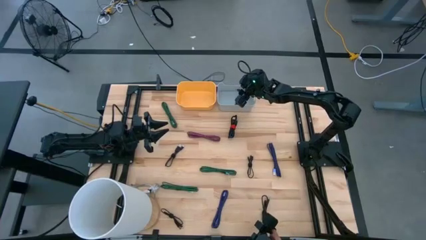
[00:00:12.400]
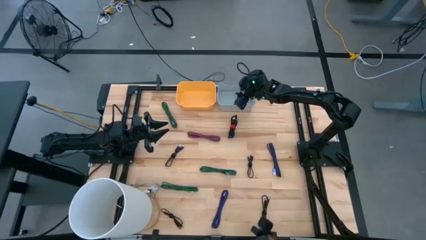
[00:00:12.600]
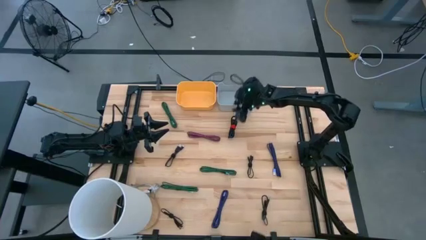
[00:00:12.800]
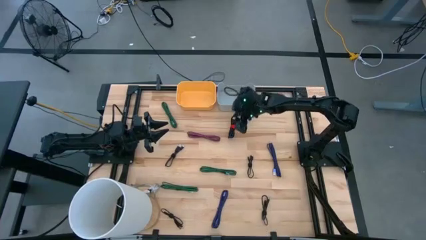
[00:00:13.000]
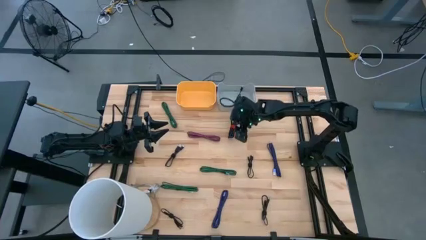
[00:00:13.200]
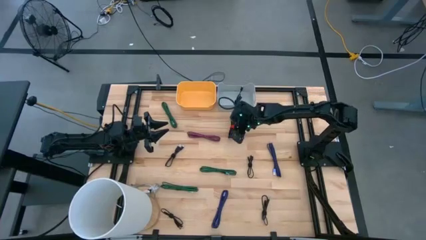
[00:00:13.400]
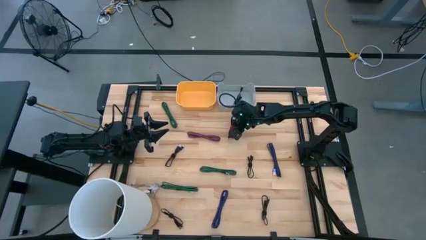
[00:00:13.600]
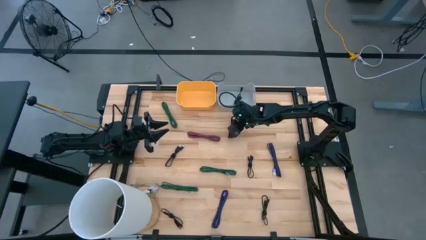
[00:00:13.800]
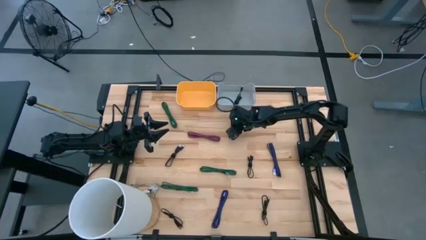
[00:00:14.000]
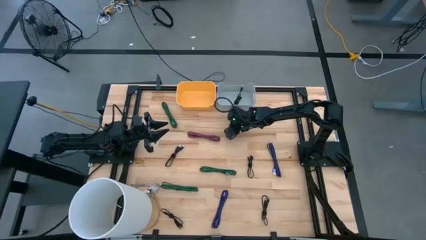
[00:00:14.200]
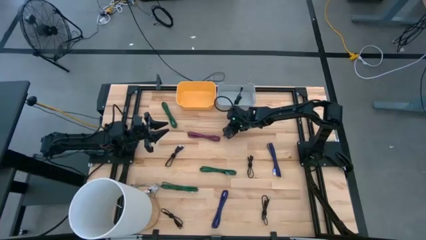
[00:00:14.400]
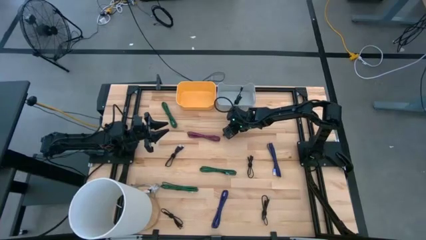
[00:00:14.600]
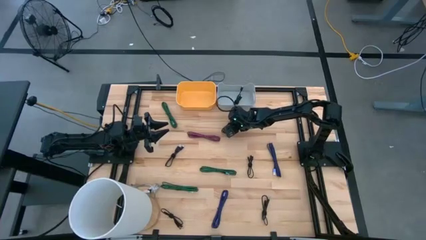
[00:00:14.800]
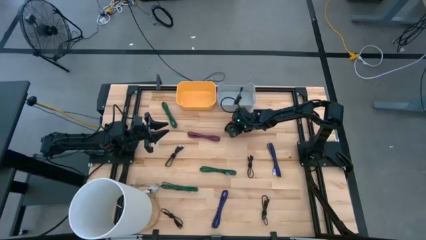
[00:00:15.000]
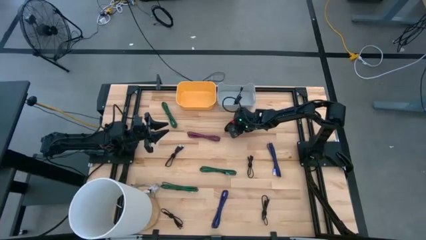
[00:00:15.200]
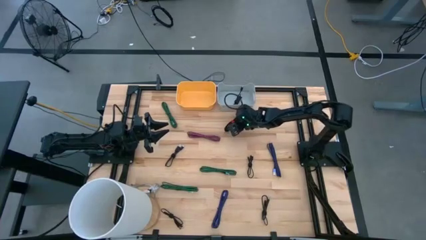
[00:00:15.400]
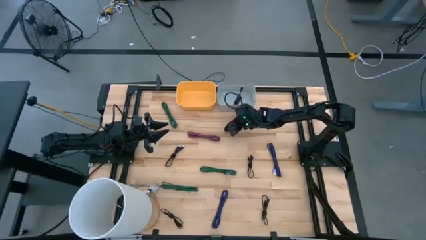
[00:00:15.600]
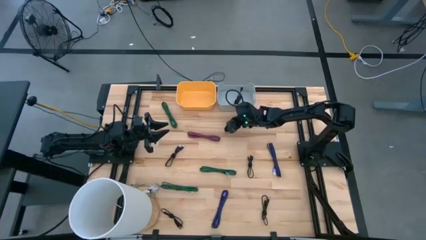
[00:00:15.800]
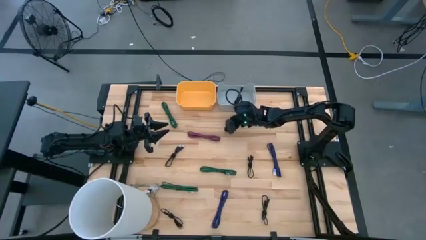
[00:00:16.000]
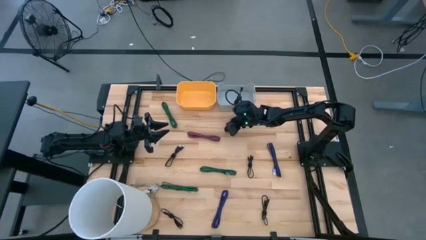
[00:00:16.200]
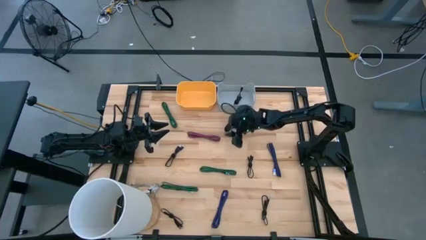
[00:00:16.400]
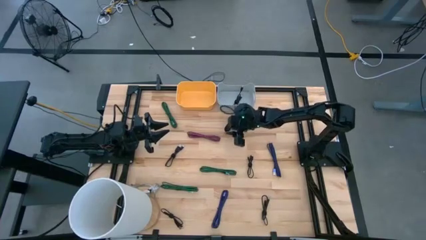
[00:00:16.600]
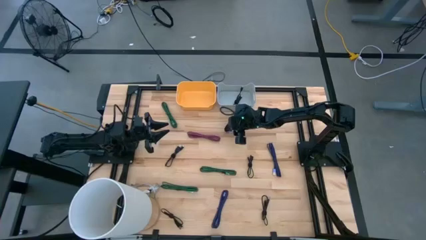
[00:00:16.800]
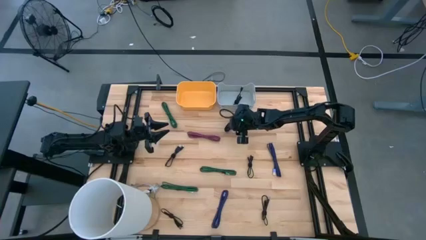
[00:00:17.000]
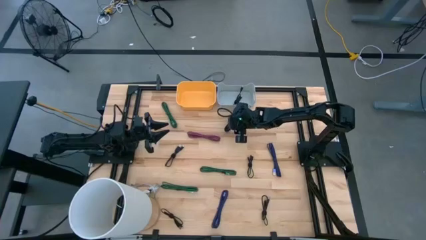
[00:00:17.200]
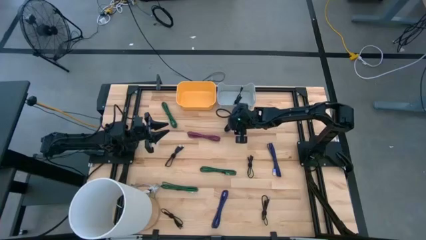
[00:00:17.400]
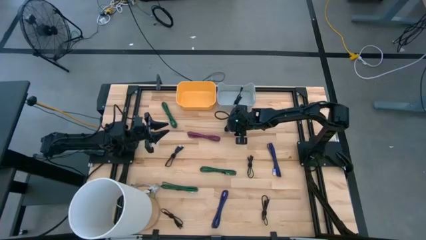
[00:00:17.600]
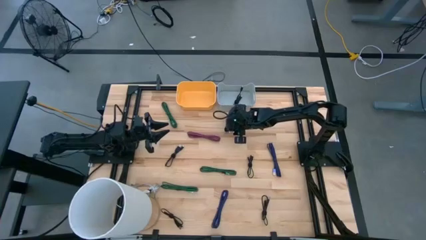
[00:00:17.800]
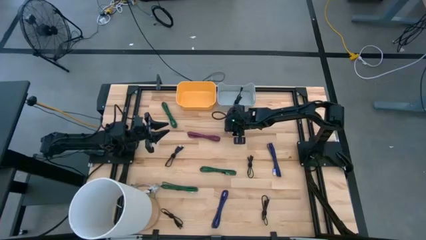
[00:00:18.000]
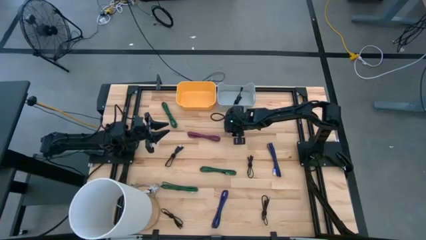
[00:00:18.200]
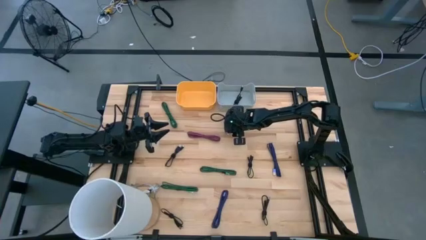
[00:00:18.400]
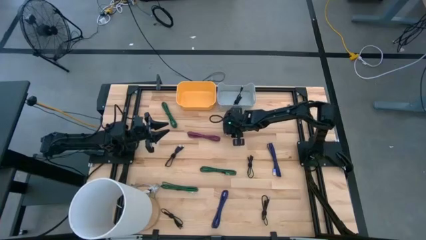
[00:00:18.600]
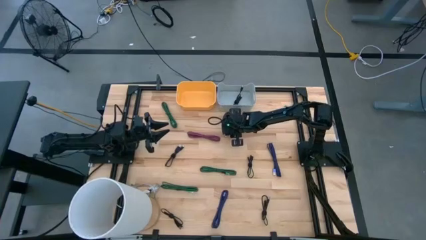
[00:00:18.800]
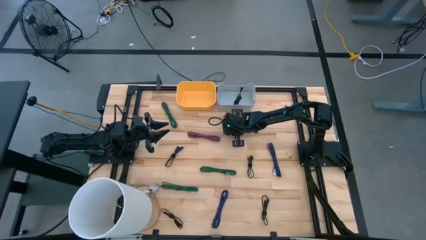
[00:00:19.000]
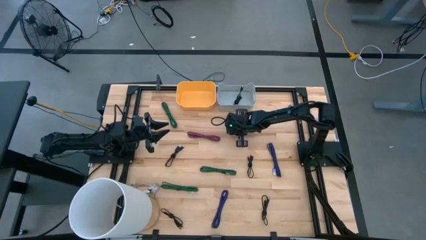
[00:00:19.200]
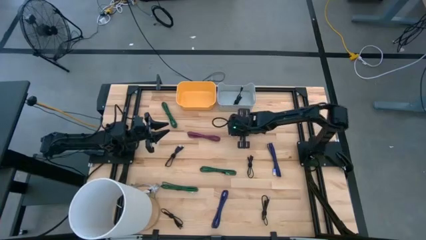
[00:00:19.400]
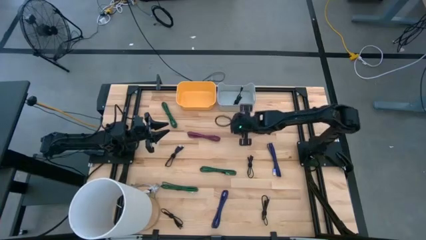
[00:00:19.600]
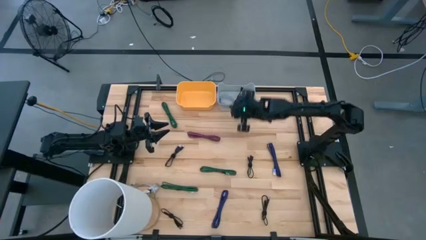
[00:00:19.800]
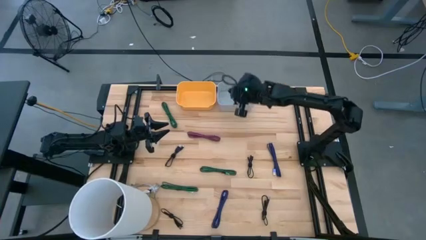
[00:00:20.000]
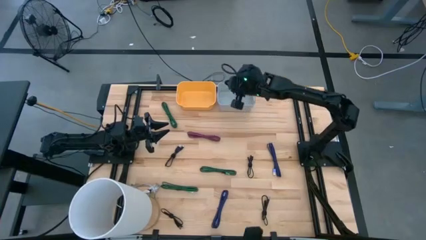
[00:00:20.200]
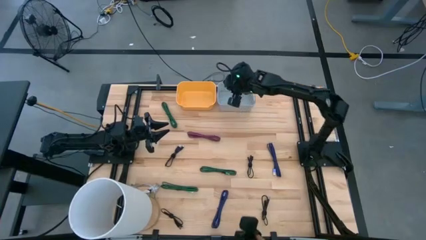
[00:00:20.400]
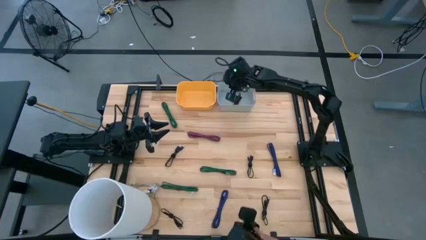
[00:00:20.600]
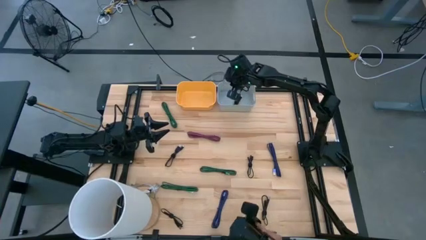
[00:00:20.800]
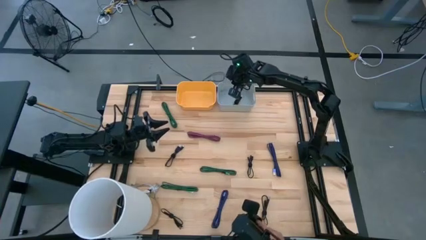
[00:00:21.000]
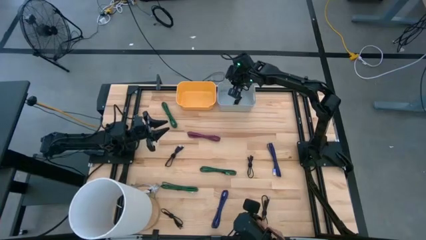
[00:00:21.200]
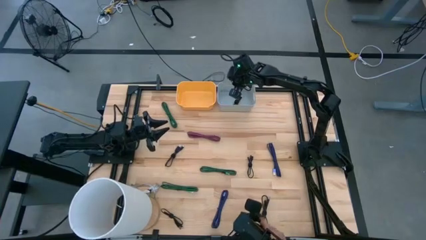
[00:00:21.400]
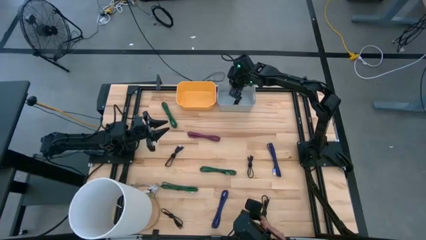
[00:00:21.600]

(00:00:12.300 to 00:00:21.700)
Task: Pick & Place USB Port
Put the black charger cable into the gray bin

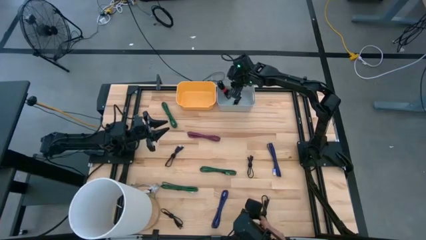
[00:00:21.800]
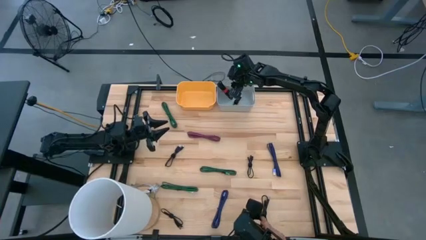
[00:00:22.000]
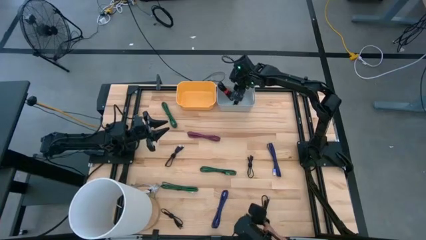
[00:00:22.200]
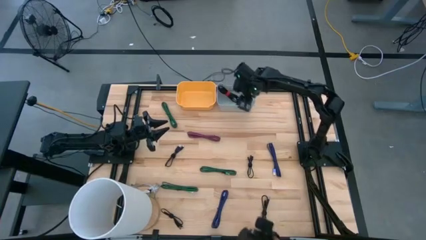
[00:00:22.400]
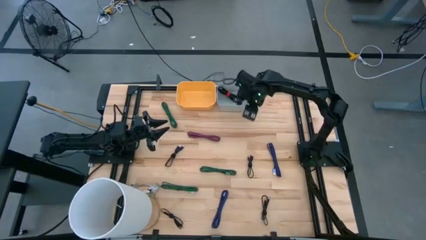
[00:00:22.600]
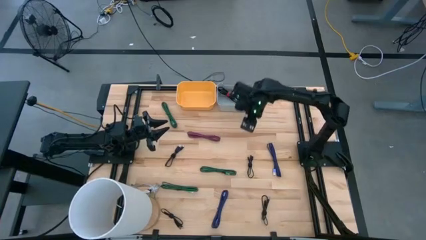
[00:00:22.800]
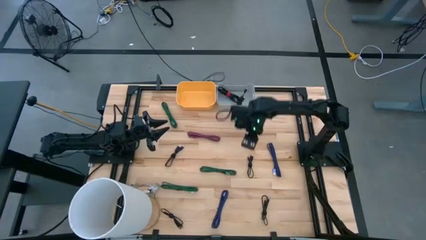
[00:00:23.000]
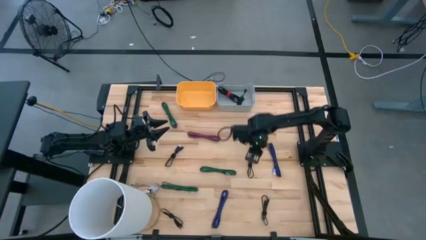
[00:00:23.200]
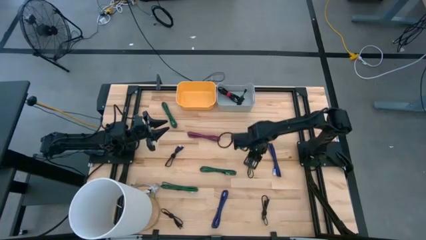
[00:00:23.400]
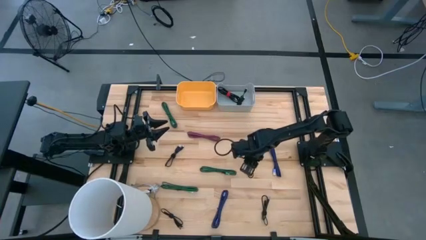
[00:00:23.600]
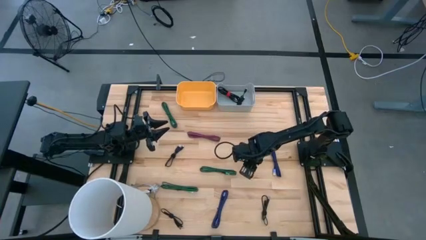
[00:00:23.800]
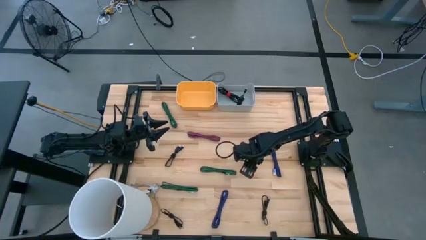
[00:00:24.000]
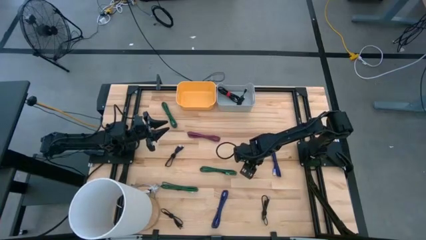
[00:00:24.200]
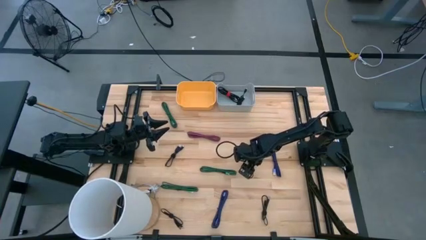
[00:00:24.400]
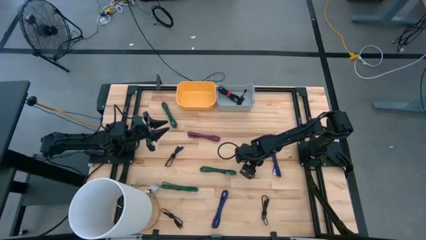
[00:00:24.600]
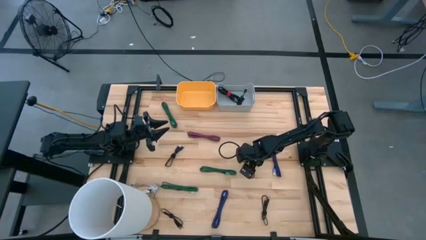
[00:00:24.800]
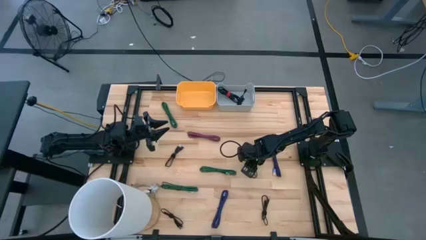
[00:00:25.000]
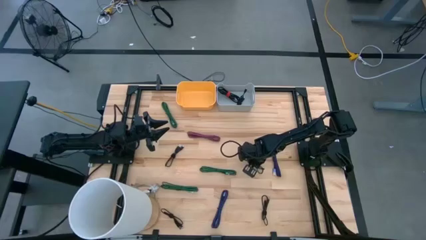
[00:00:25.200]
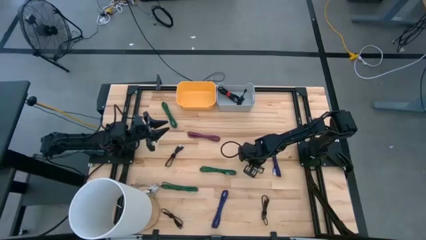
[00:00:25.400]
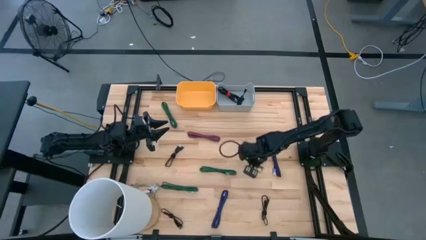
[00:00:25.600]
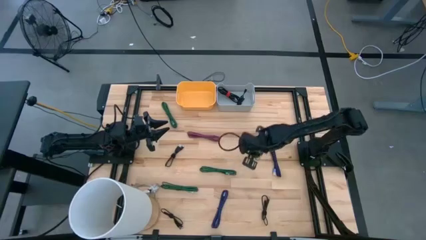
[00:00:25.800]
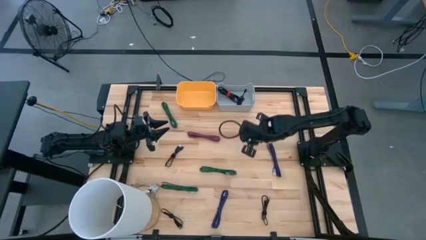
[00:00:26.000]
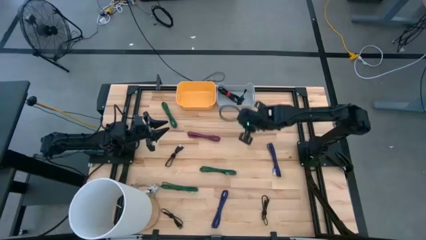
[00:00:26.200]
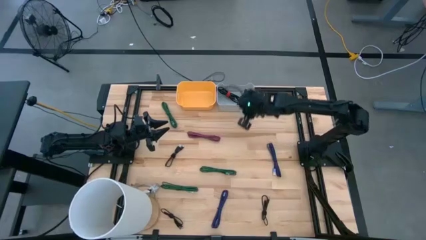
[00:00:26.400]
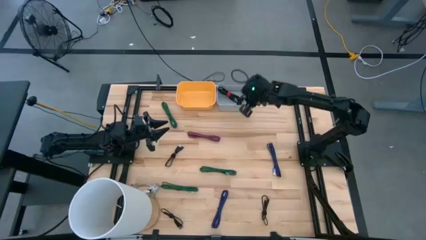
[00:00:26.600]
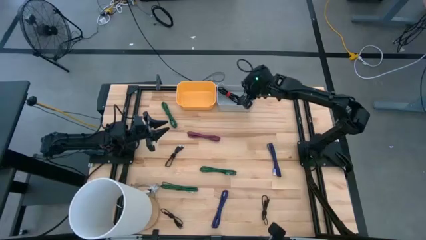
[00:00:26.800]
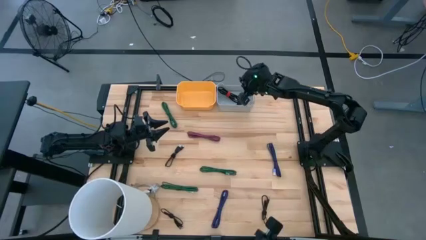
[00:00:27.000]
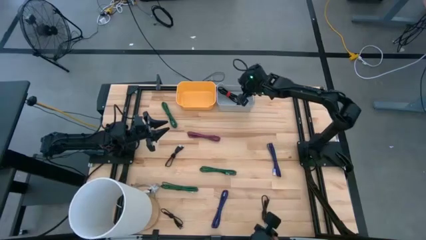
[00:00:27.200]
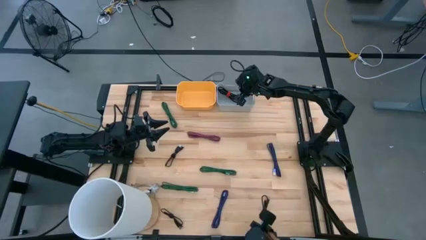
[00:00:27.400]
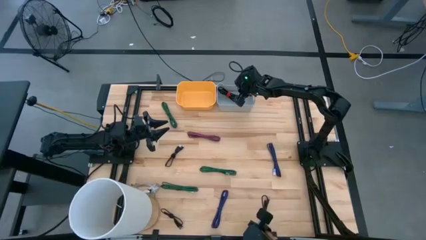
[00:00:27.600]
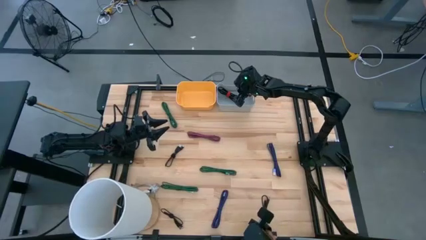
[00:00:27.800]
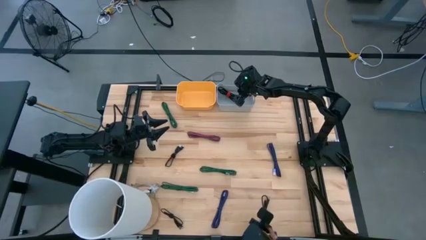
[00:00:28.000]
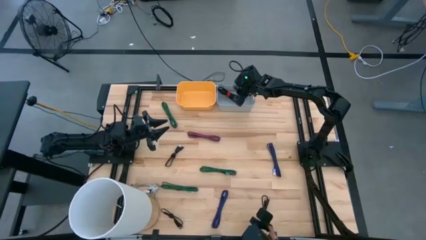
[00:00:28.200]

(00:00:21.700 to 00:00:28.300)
Put the black charger cable into the gray bin
